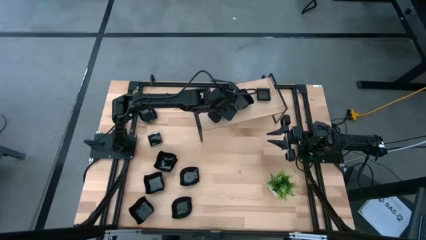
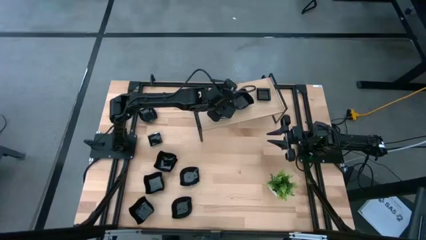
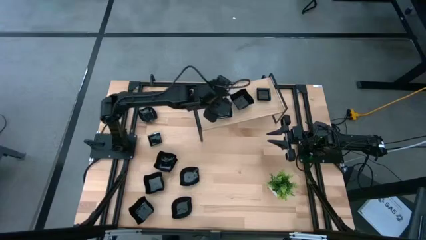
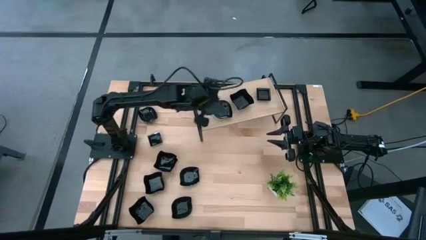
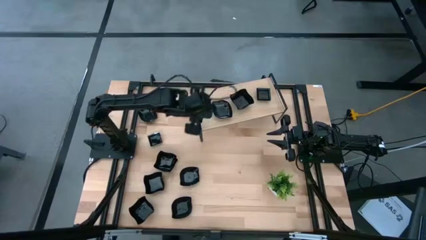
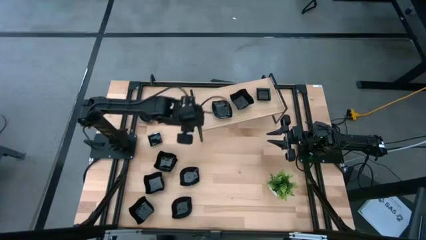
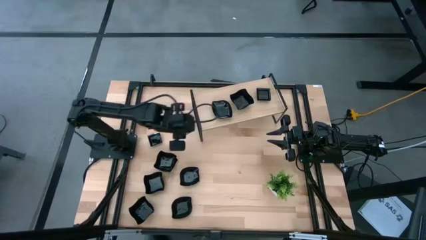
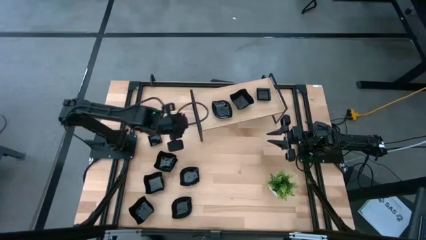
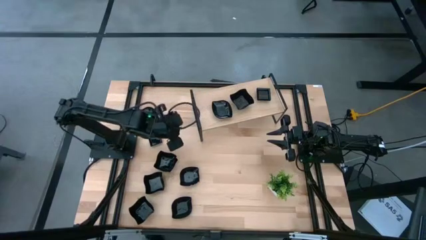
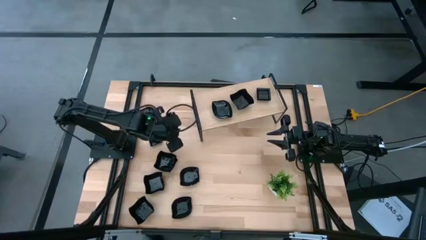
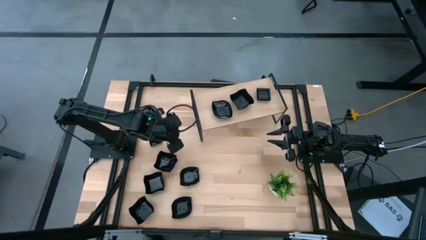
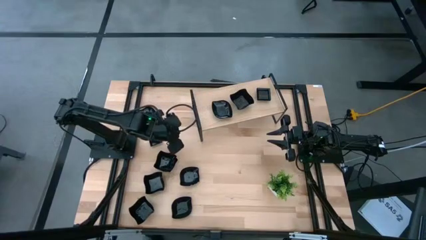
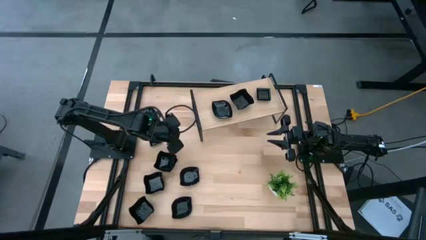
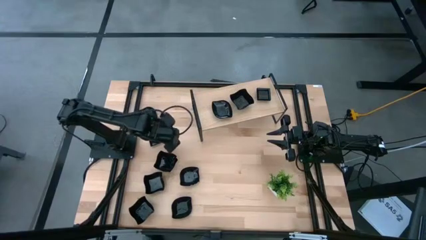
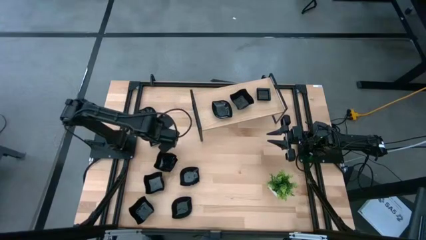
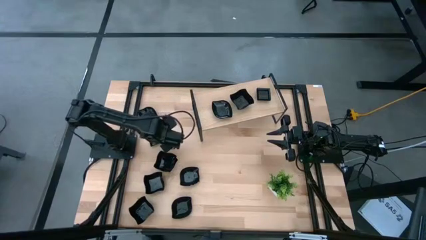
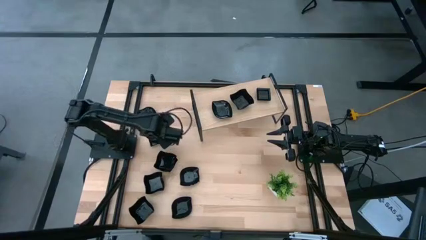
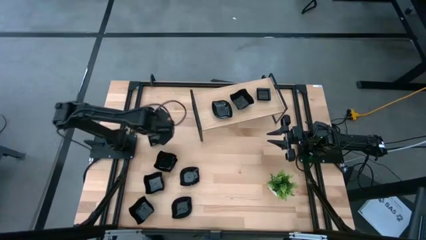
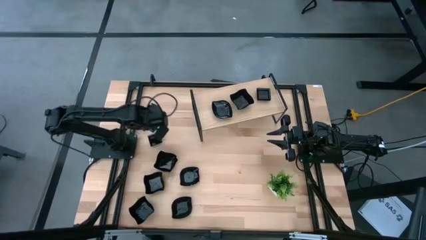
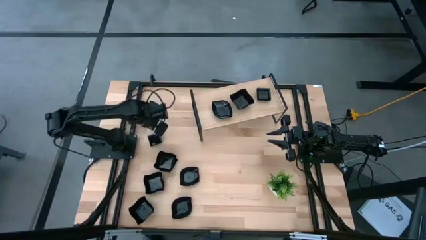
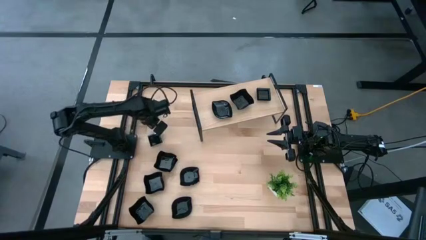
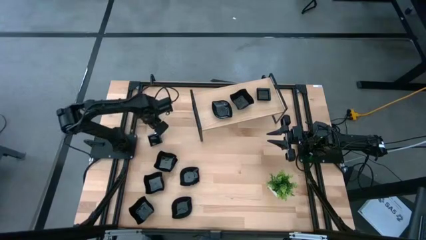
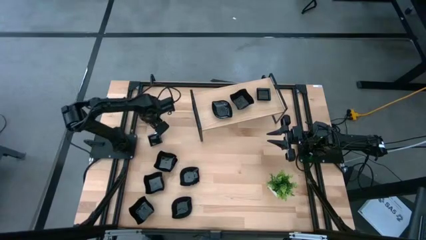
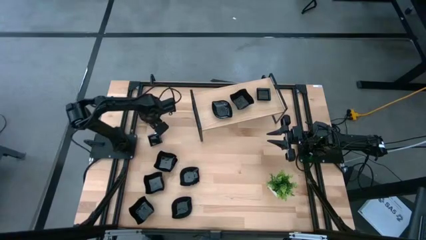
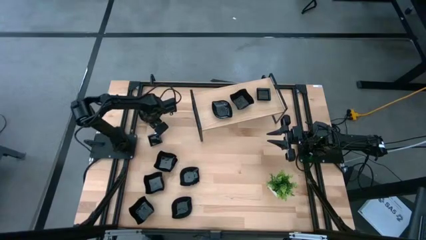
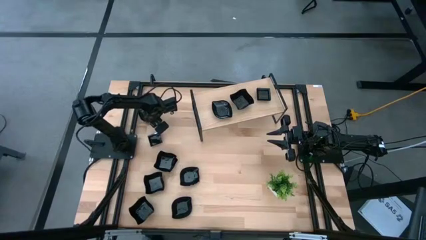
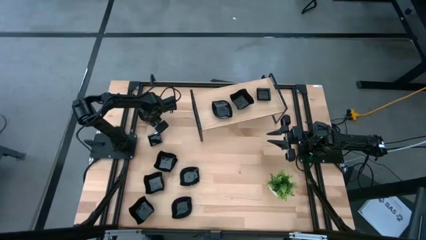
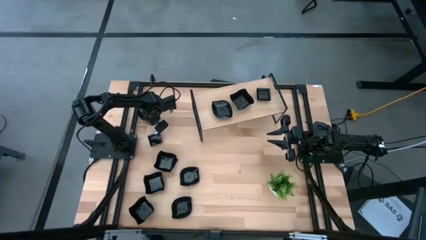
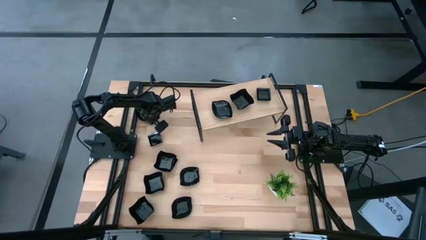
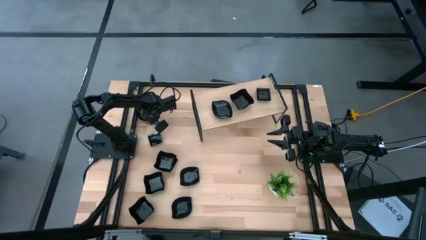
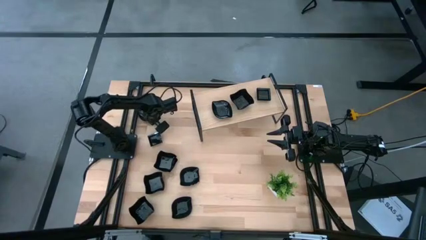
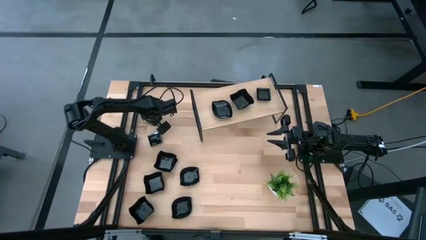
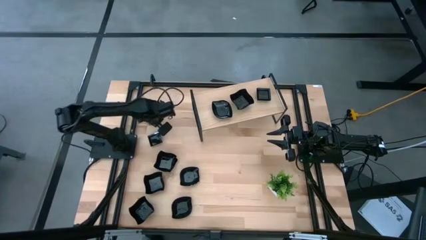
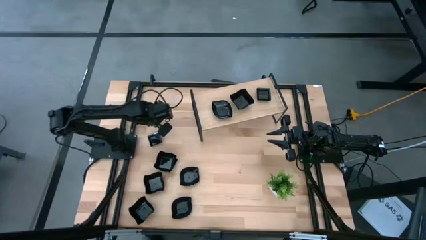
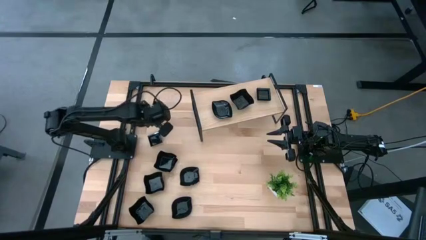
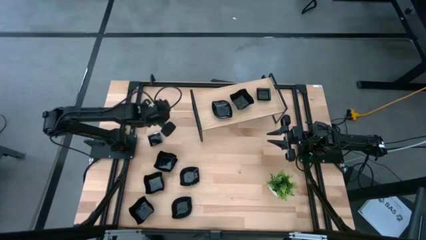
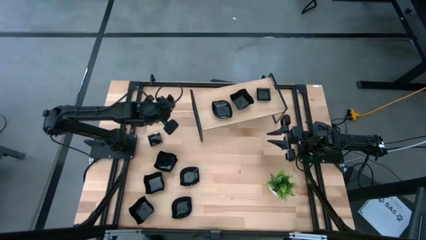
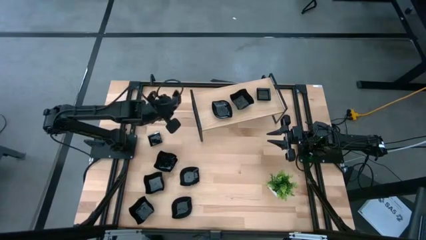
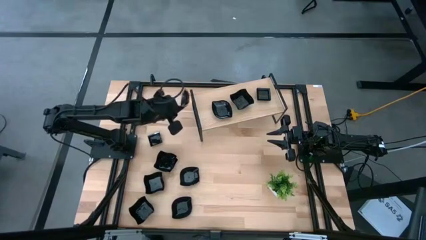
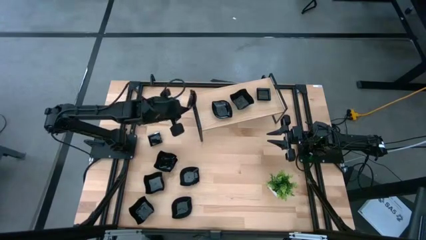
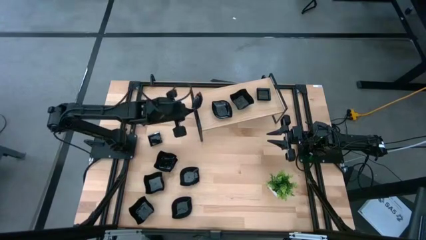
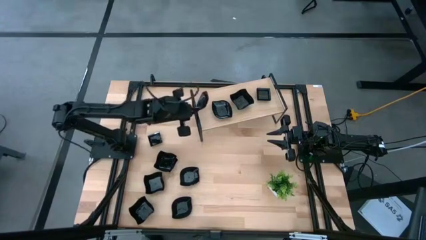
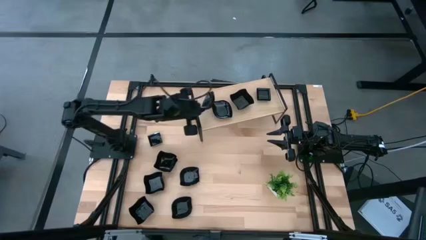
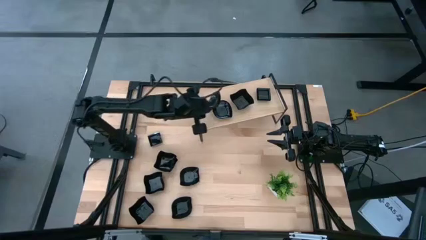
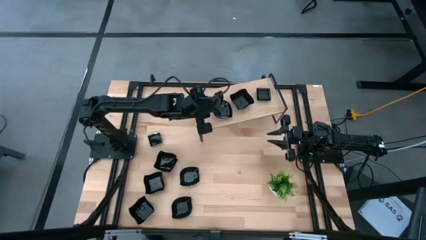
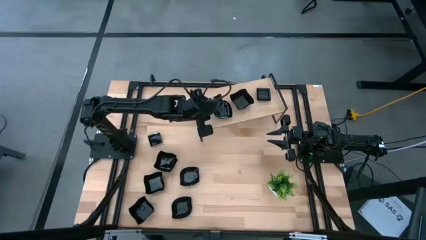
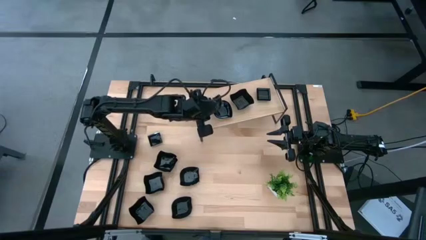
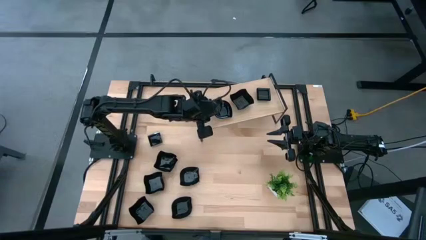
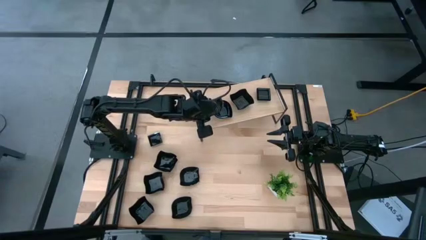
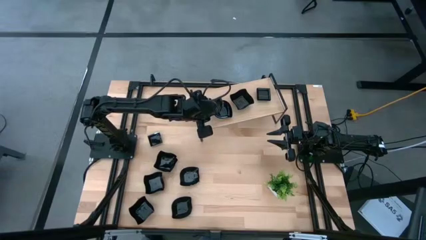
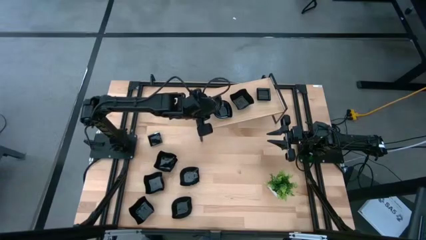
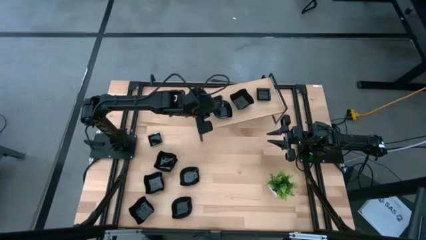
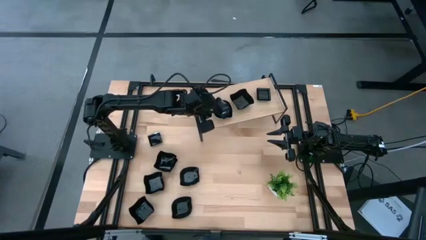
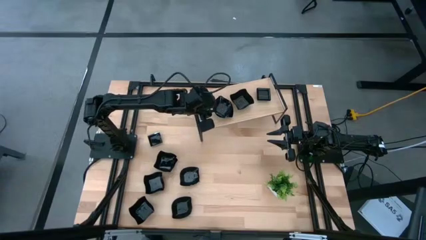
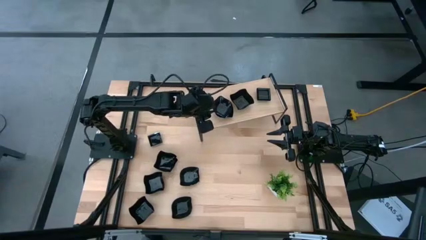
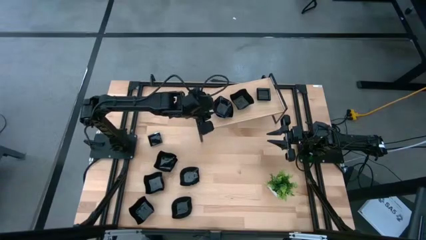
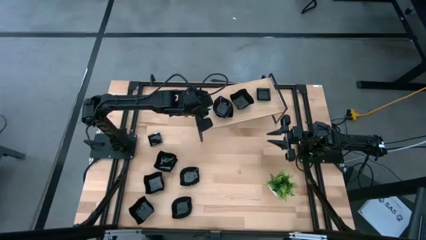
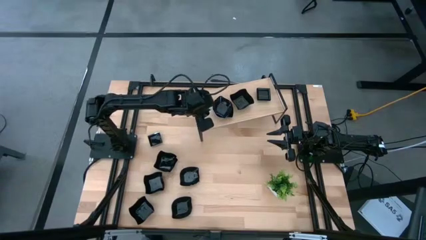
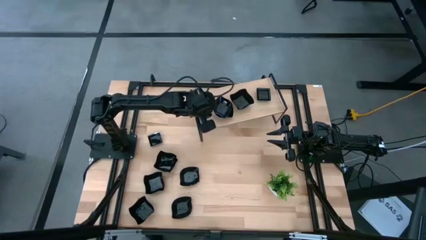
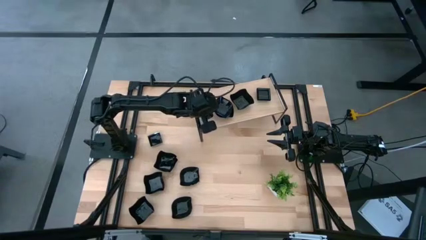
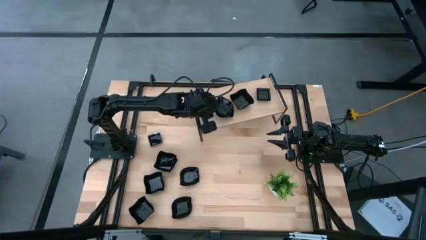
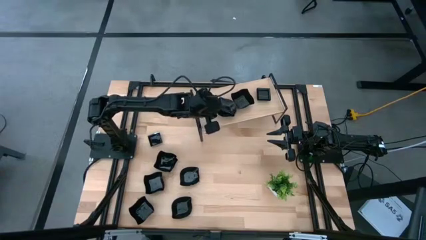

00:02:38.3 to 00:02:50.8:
Task: Pick & Place Mini shaped plates
Stack the leaf-shaped plate on top of the leaf-shaped plate on the shelf

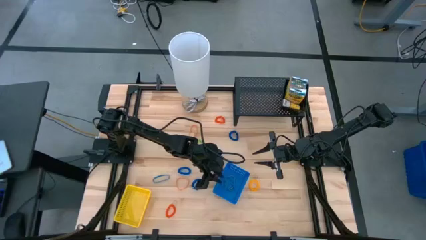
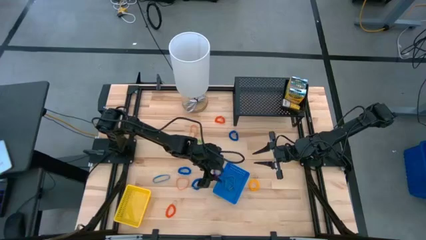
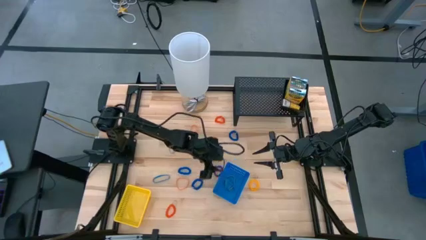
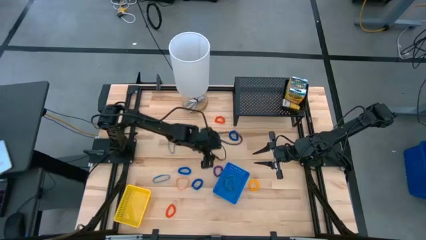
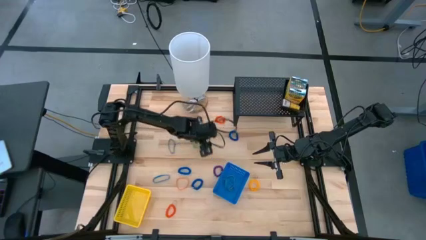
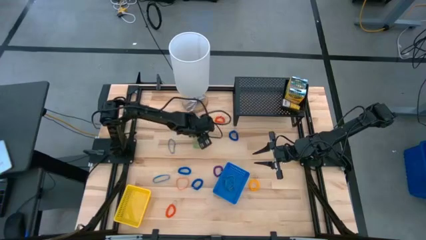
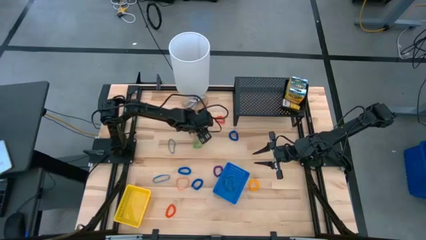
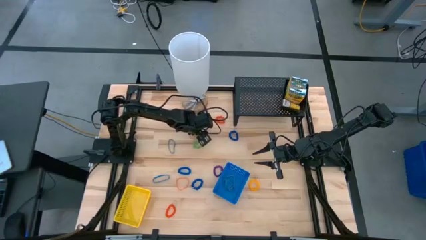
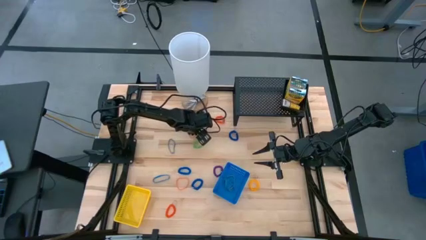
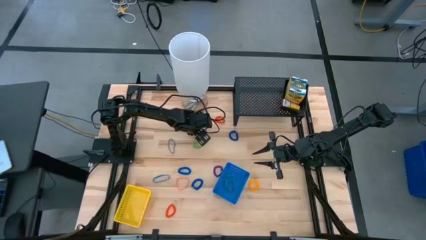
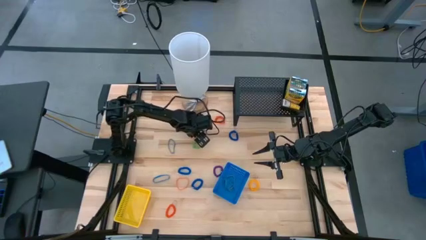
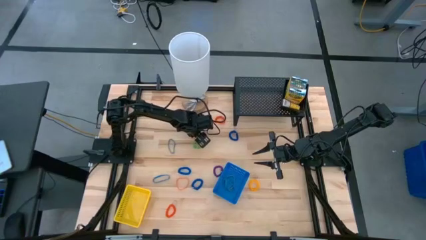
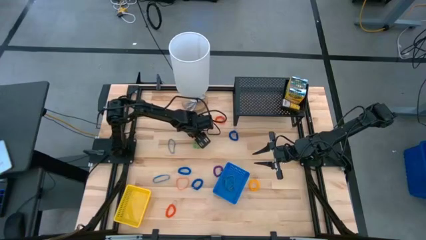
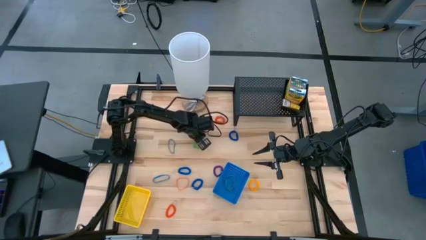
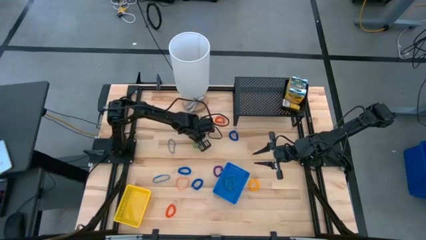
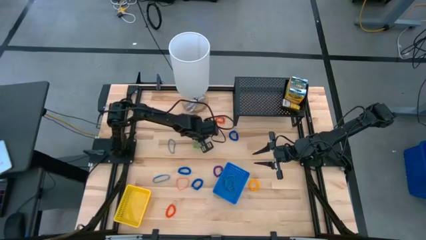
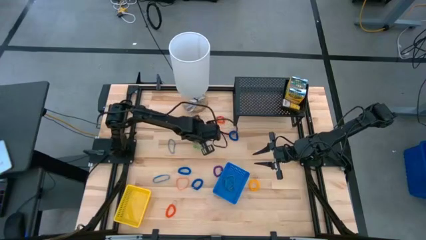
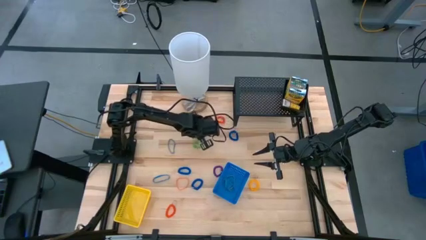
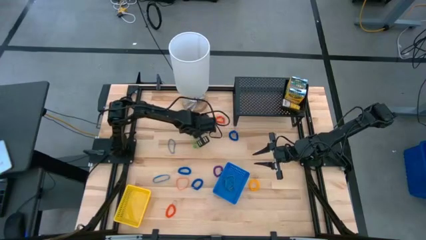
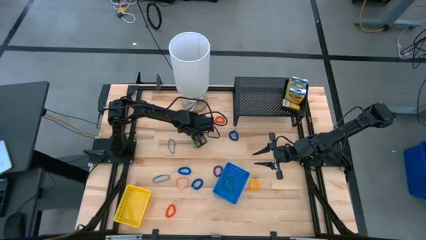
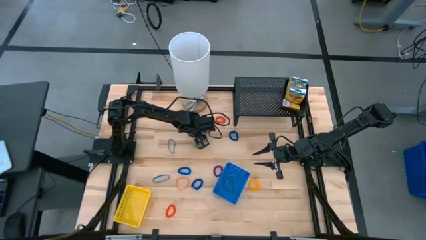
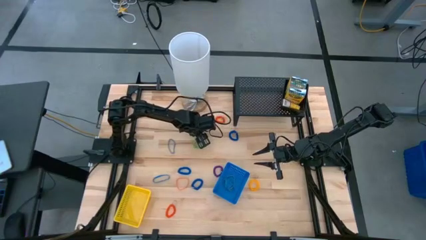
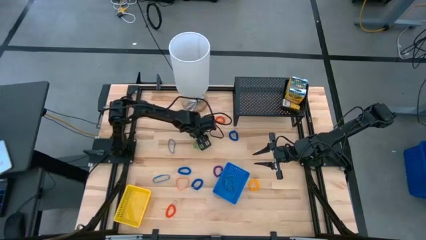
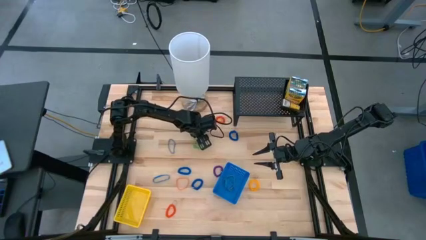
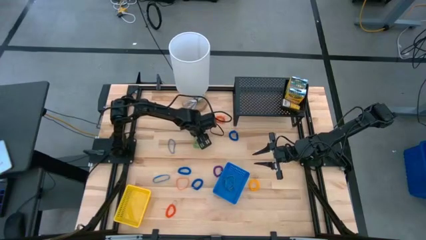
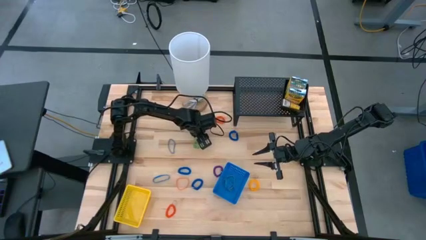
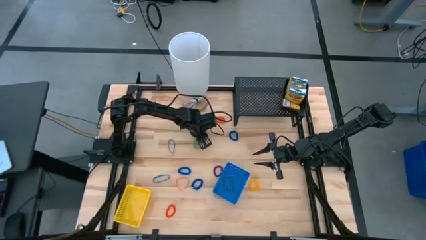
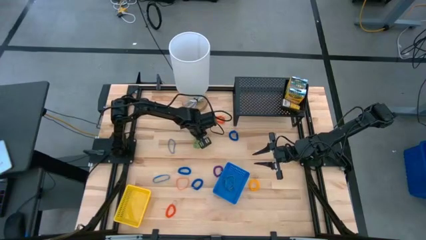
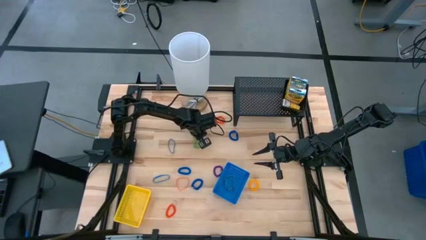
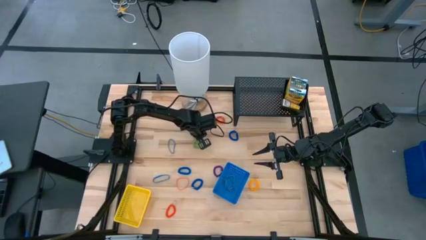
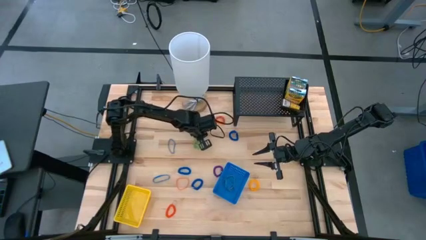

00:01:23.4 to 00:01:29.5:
Task: Pick & Place Office Desk Supplies
Put the orange rubber band into the blue bin
